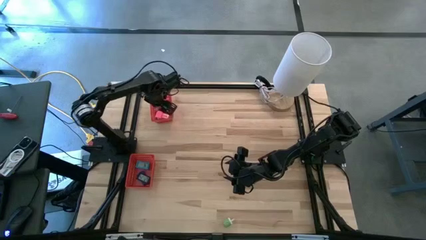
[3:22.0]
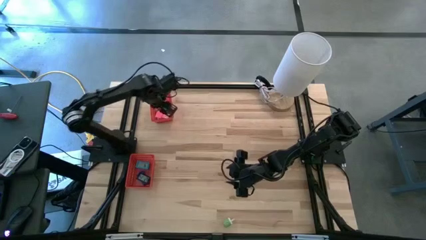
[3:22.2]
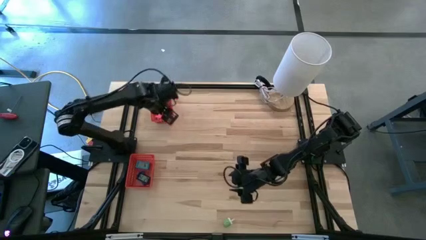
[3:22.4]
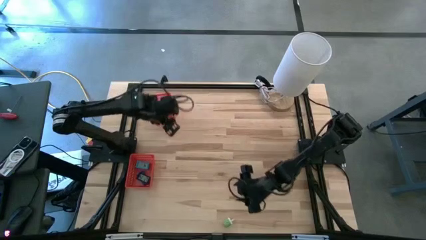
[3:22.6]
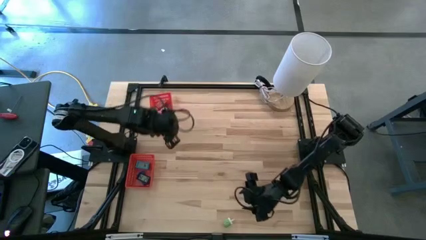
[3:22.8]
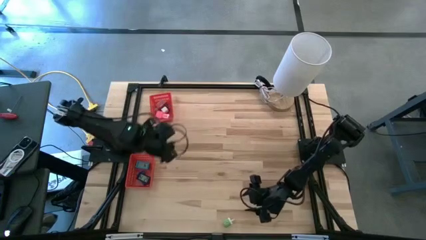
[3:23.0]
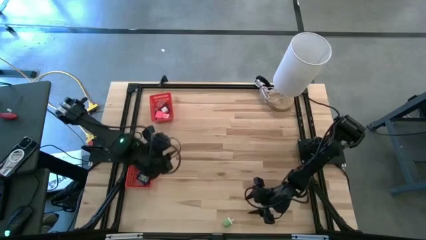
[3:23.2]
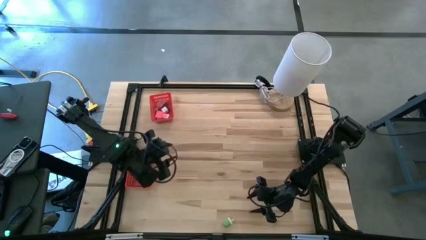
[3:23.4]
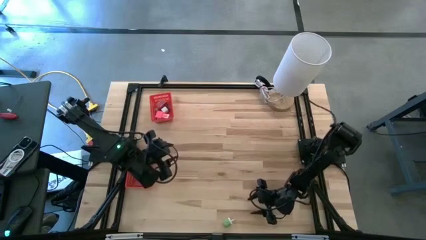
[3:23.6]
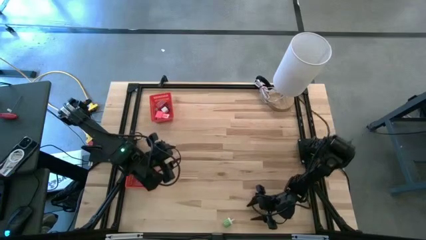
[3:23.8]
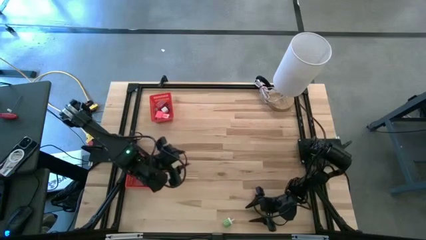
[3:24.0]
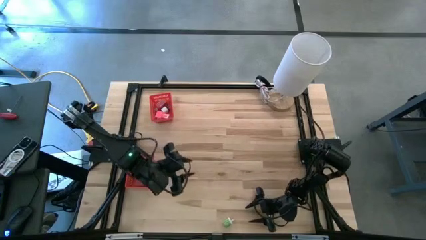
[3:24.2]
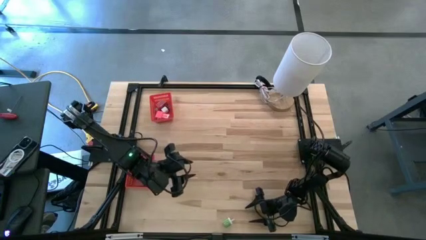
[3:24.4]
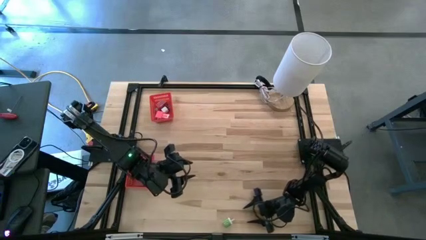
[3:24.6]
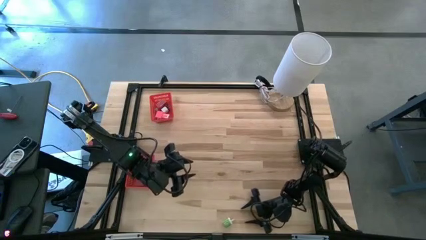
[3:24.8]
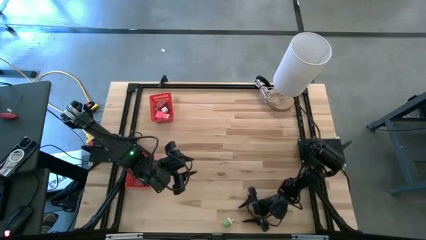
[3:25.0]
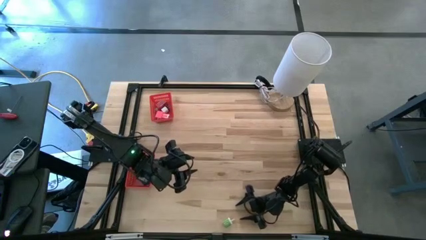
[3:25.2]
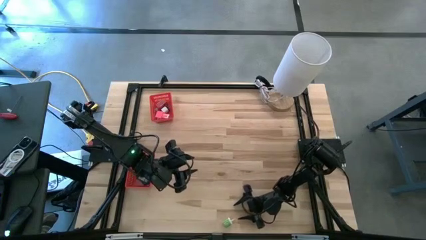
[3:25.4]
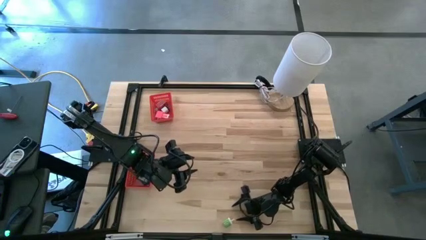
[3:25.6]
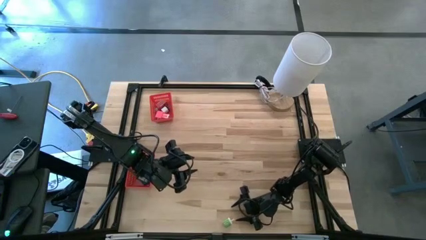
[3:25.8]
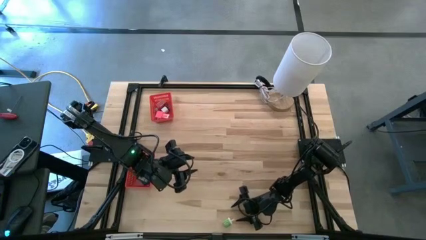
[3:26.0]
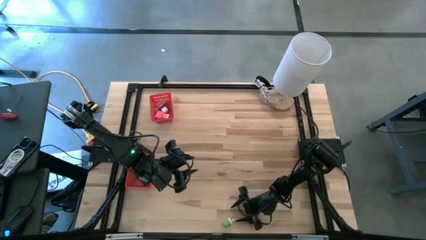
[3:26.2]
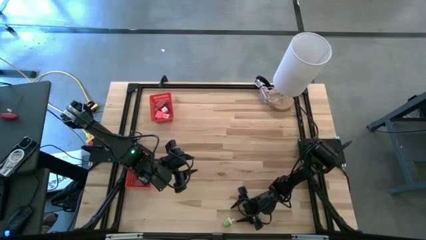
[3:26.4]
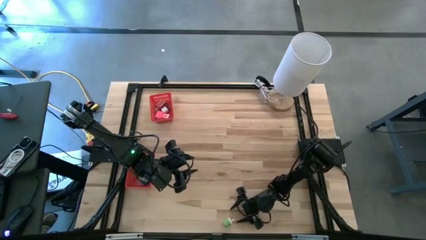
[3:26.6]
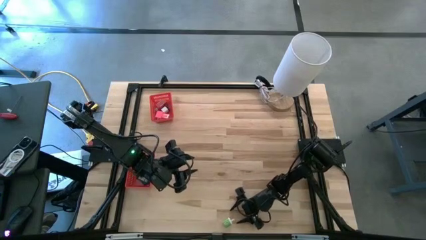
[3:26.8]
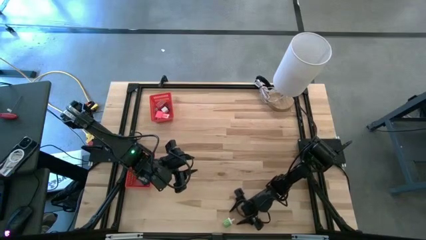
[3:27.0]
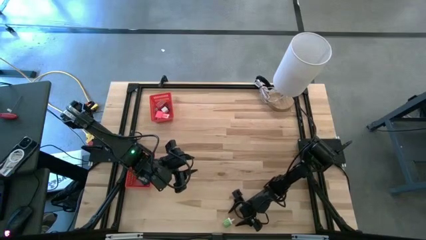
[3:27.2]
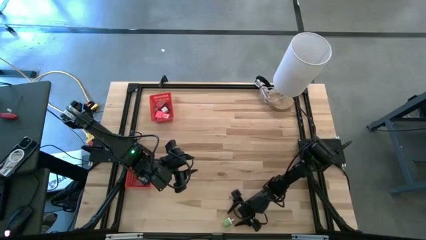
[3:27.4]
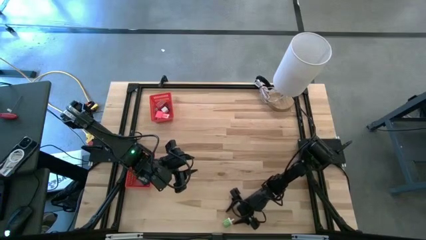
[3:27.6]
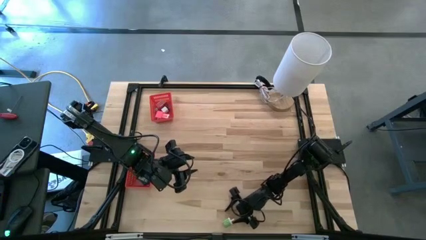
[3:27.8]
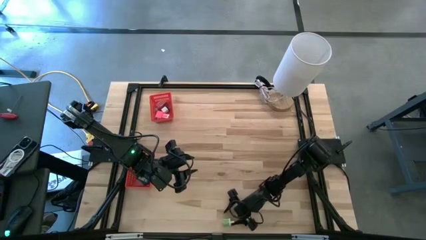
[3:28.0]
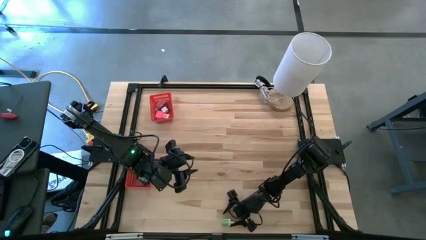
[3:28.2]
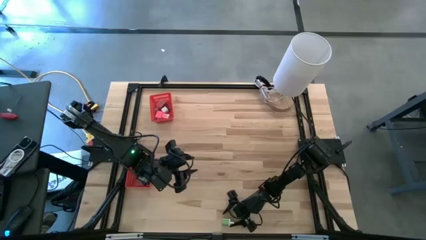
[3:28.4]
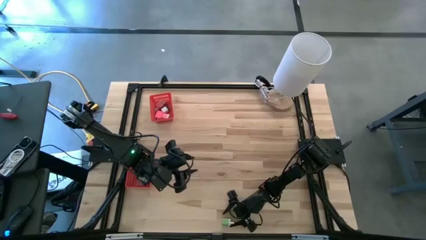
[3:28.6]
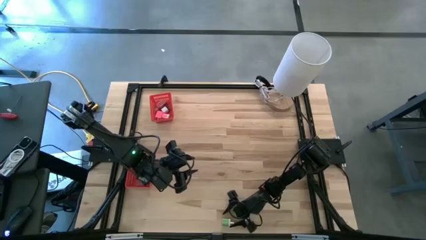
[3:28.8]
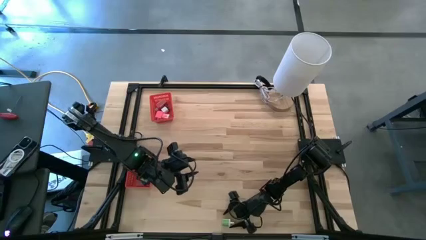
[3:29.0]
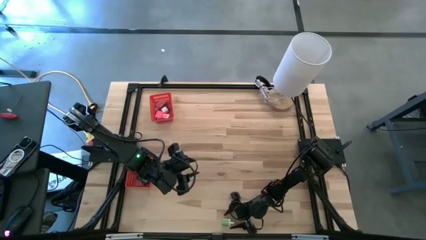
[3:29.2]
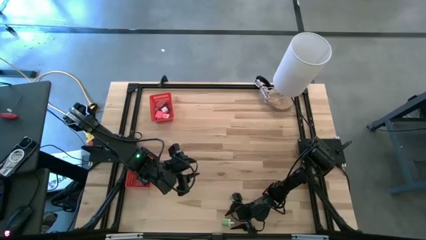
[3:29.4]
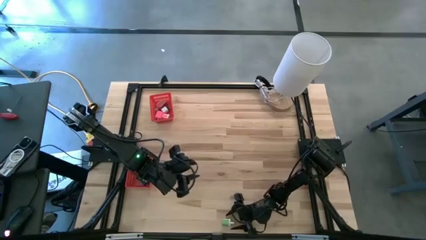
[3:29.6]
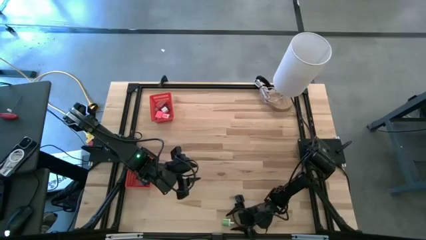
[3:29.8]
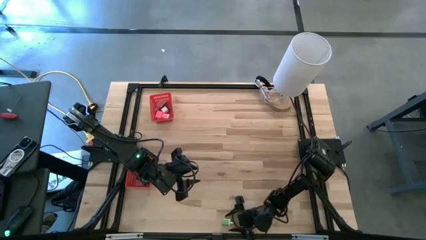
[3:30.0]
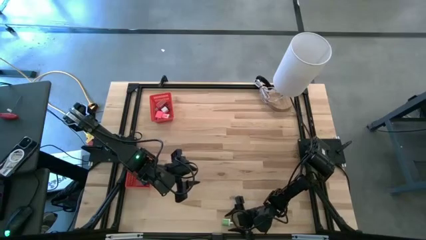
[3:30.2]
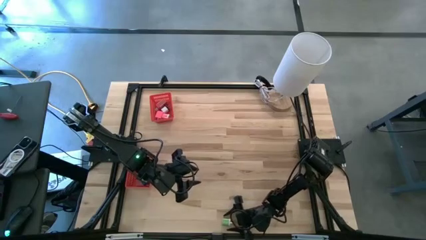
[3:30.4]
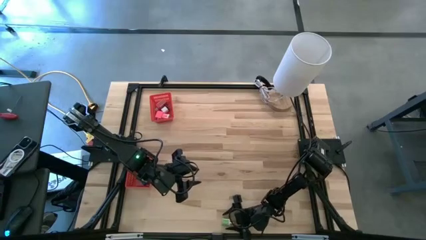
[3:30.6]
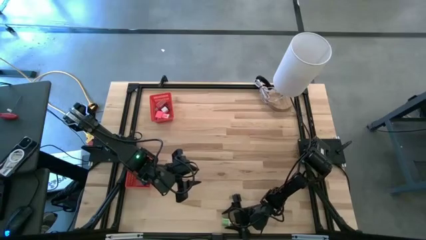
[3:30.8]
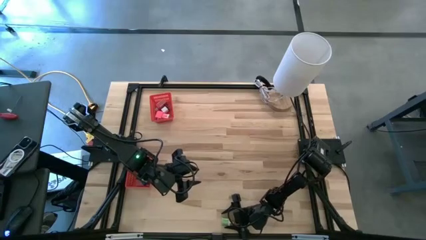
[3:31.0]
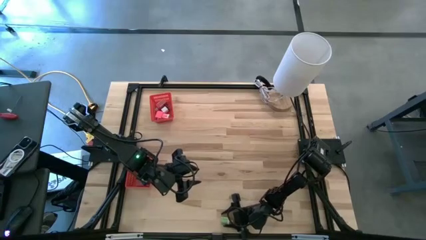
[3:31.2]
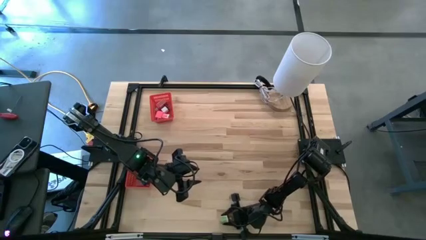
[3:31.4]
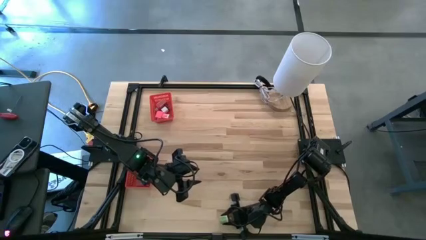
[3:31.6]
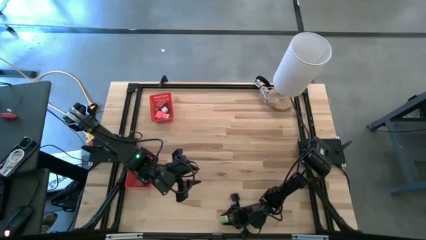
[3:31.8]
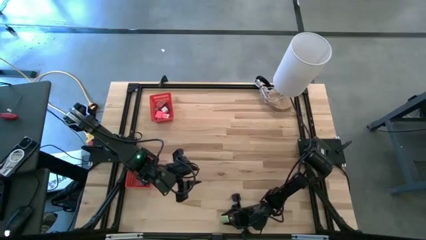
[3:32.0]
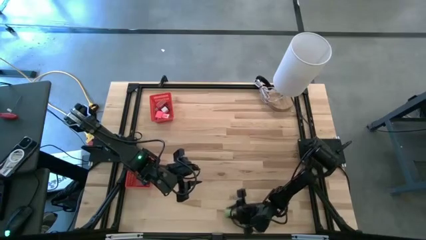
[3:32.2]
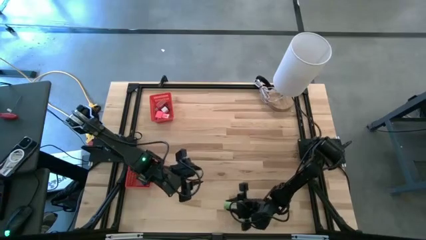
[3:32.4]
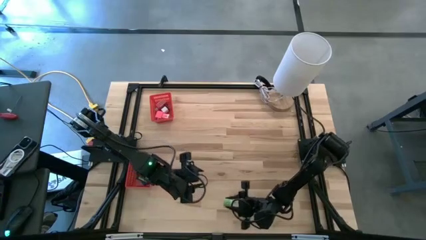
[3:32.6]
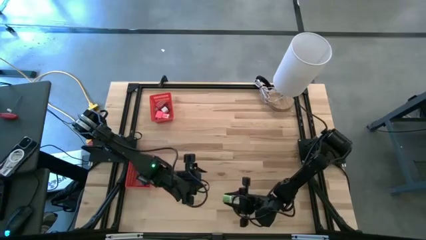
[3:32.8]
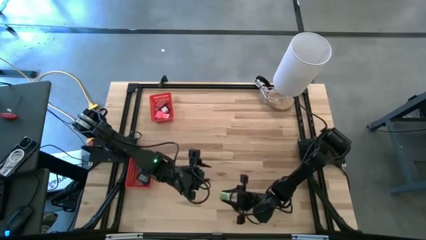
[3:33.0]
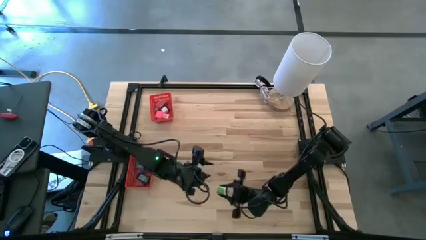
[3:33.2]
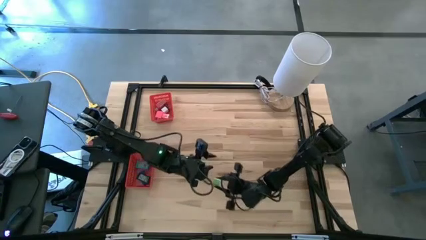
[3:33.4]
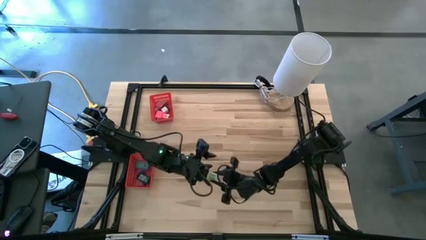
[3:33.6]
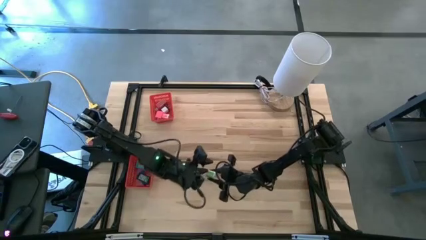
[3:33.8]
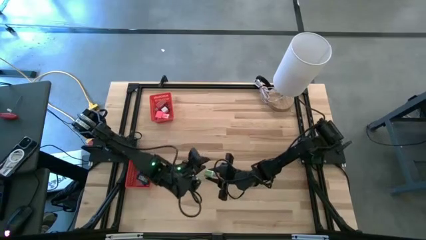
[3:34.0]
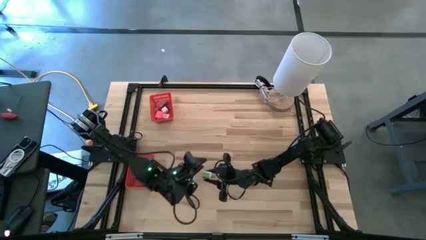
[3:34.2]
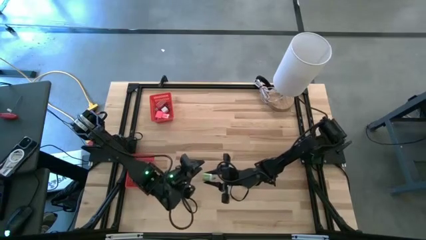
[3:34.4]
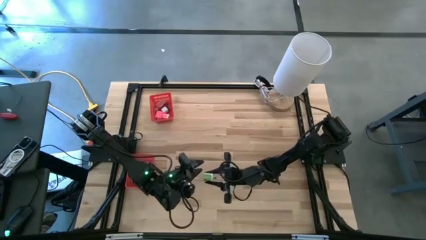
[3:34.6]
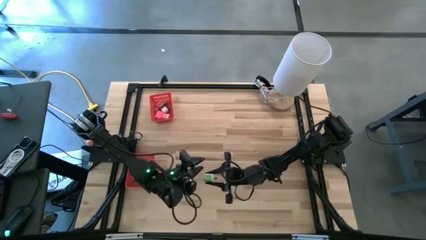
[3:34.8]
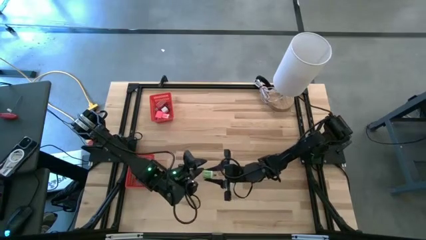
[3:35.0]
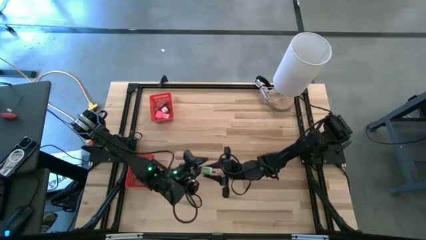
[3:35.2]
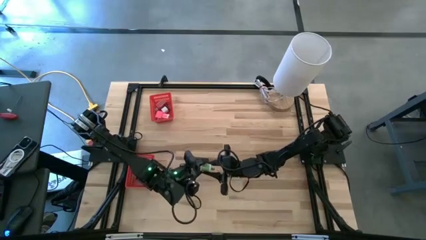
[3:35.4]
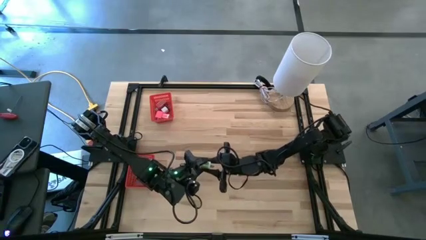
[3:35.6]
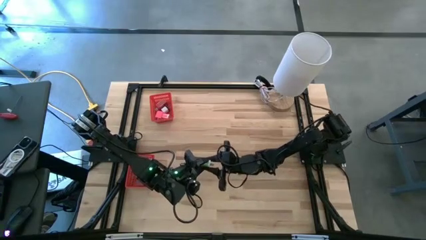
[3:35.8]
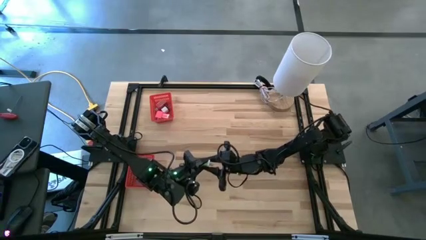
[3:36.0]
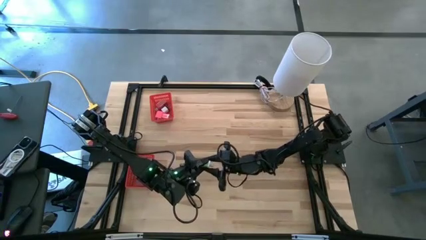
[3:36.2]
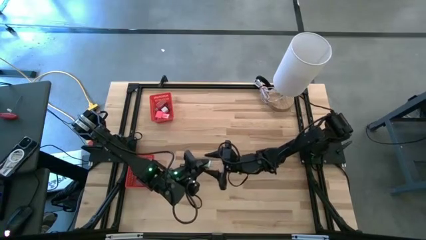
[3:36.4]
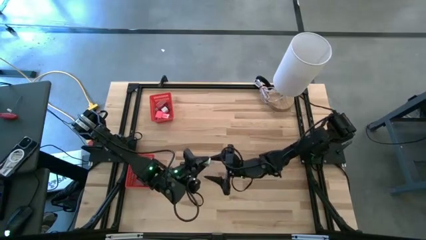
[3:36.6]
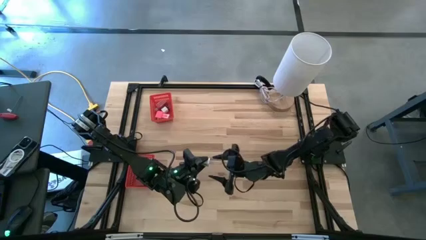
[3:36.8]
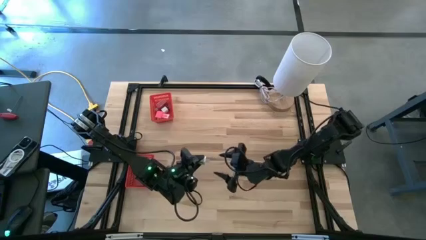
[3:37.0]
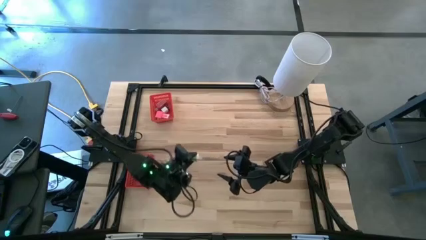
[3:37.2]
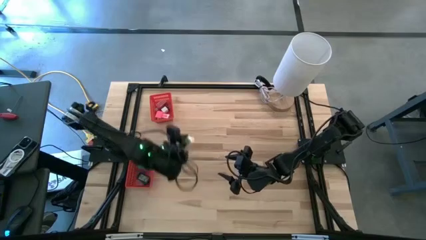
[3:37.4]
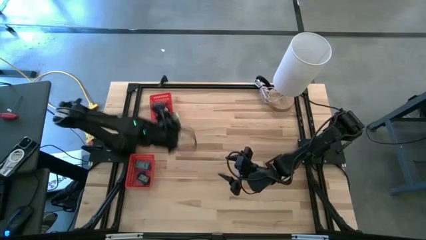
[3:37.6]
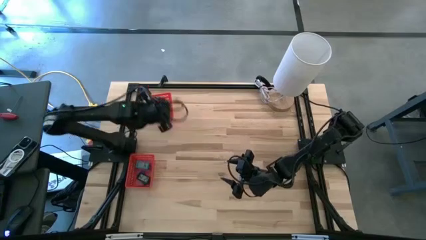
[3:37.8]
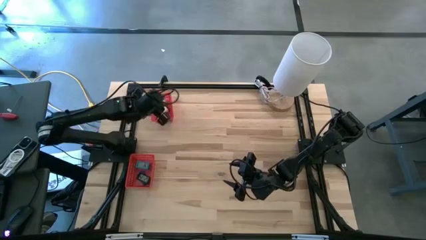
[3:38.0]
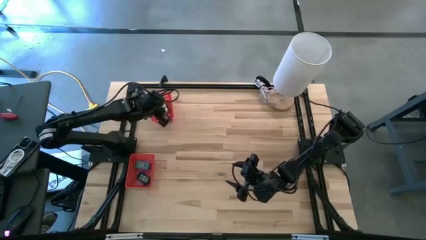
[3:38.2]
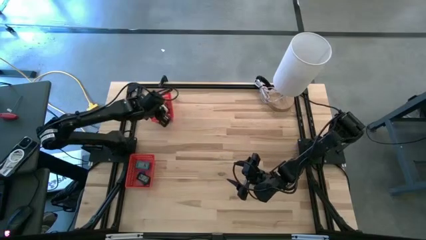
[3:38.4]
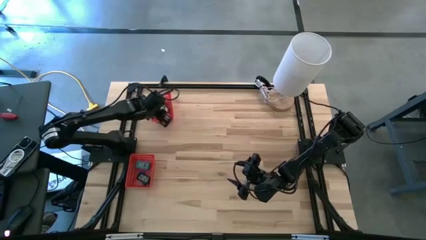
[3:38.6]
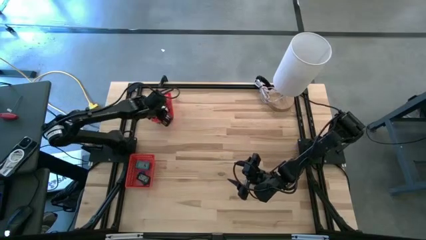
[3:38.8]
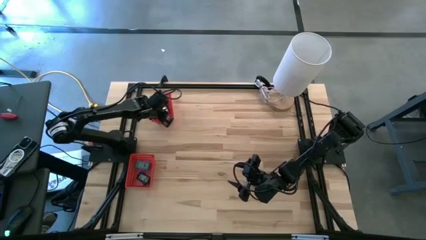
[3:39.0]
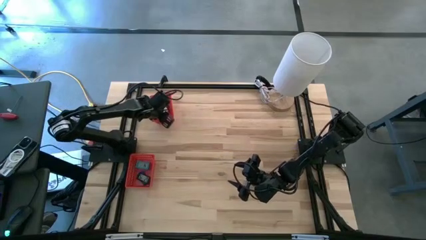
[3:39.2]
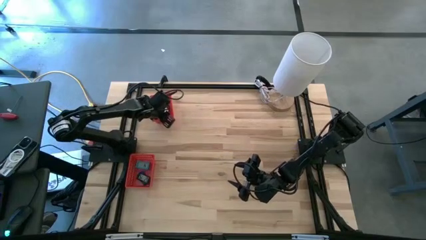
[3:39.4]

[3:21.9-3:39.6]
Task: Pick & Place Office items
Put the green adaptor into the top red bin
